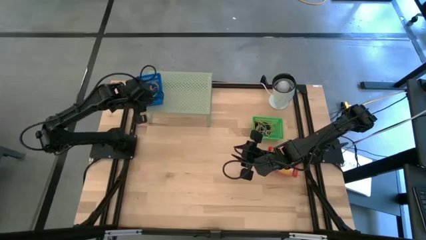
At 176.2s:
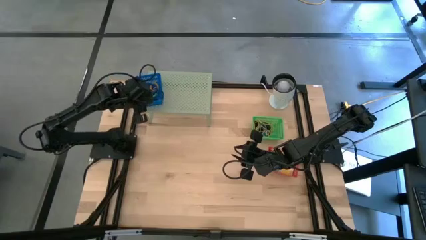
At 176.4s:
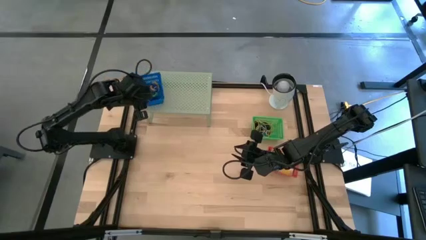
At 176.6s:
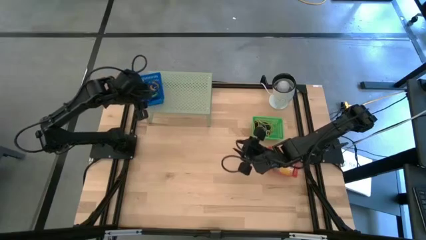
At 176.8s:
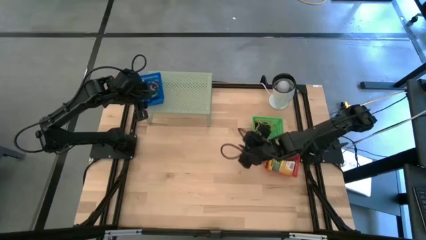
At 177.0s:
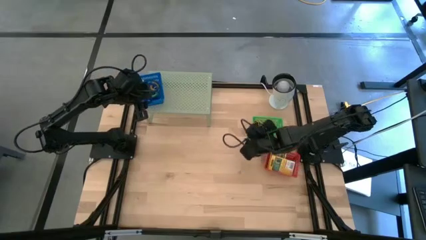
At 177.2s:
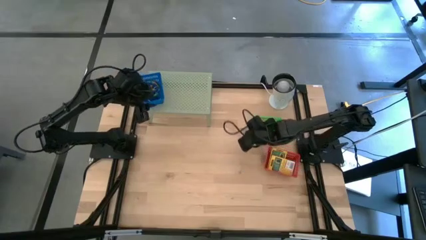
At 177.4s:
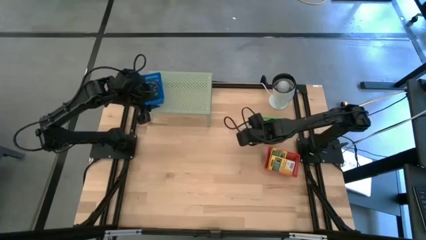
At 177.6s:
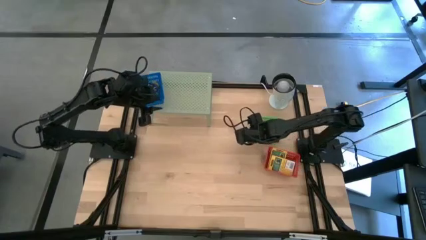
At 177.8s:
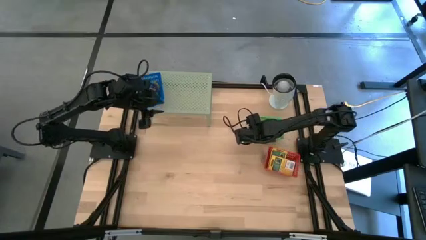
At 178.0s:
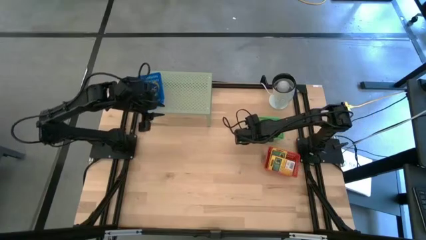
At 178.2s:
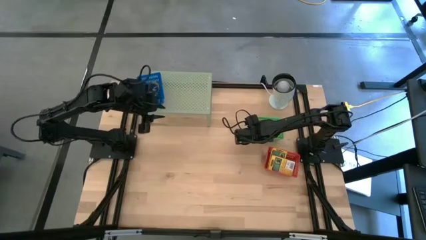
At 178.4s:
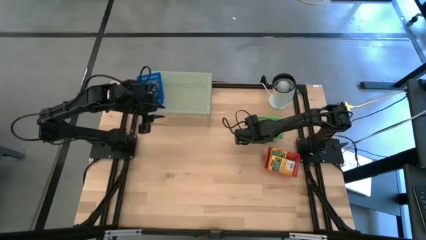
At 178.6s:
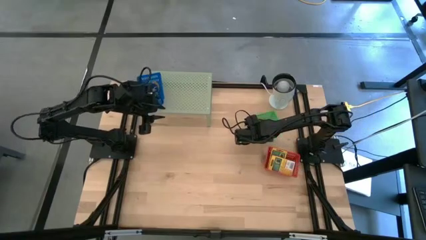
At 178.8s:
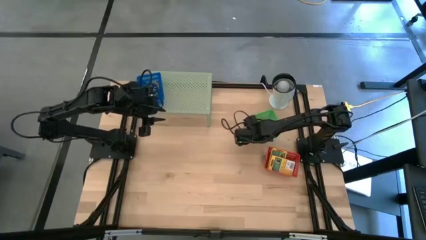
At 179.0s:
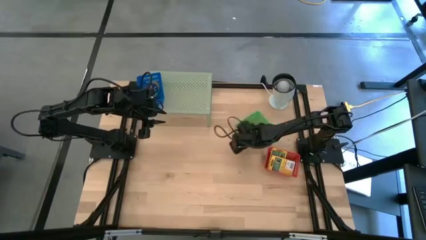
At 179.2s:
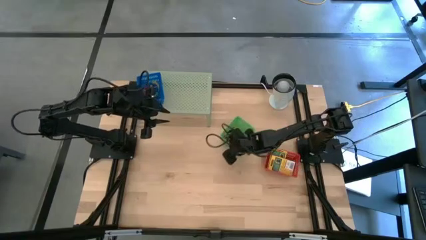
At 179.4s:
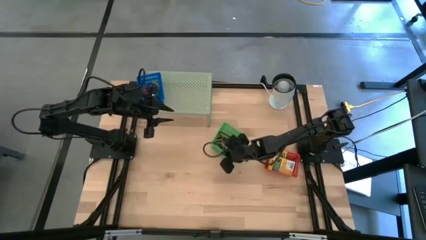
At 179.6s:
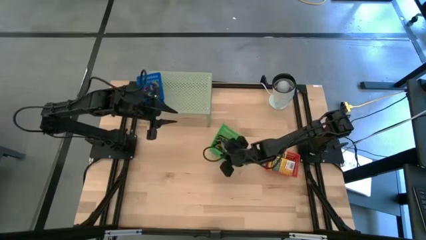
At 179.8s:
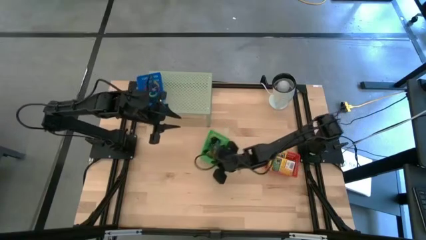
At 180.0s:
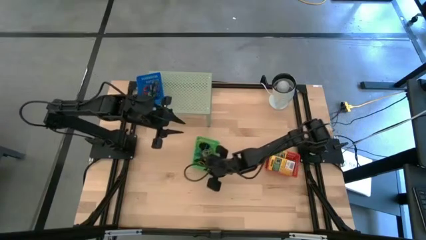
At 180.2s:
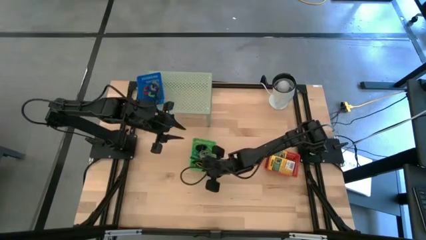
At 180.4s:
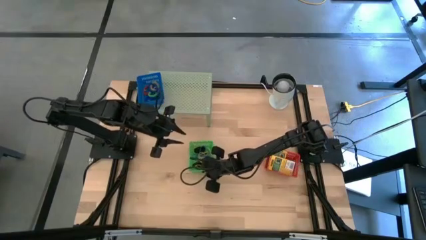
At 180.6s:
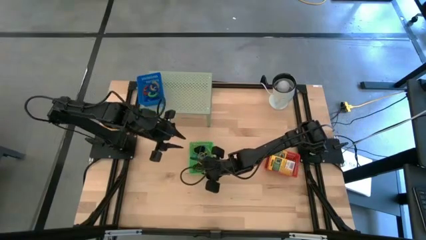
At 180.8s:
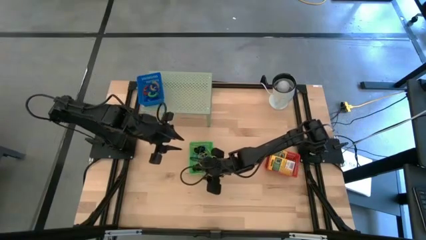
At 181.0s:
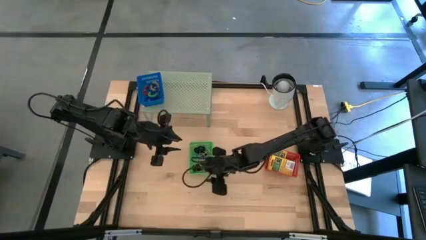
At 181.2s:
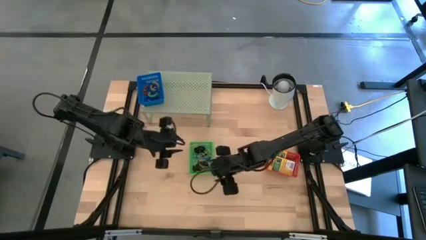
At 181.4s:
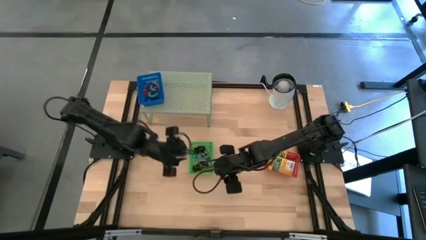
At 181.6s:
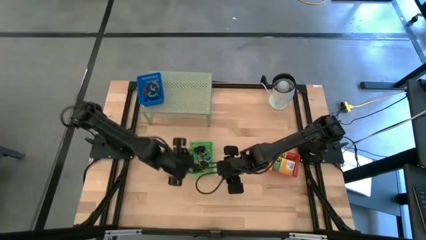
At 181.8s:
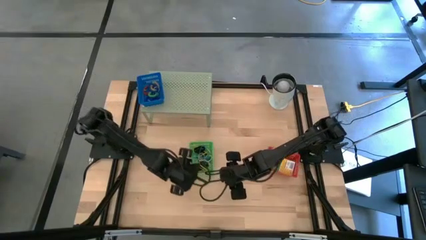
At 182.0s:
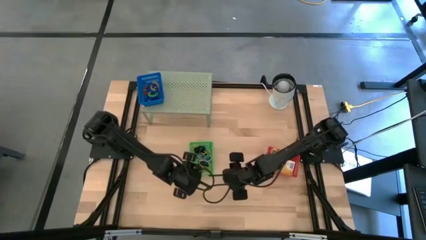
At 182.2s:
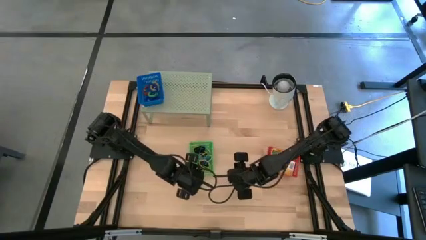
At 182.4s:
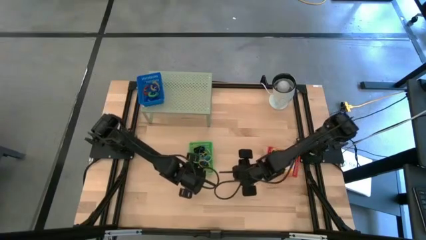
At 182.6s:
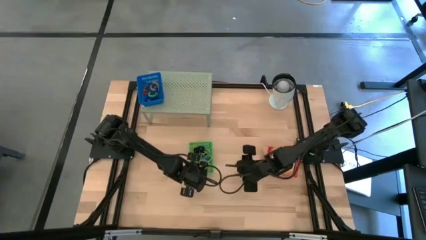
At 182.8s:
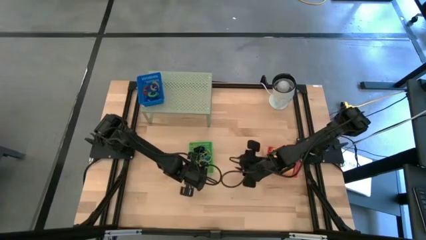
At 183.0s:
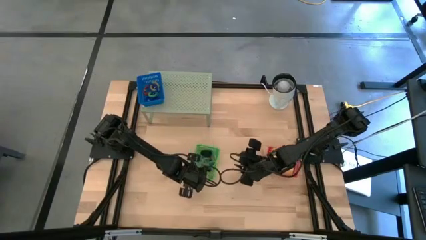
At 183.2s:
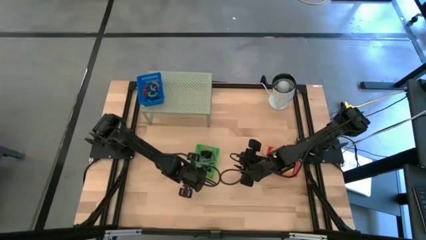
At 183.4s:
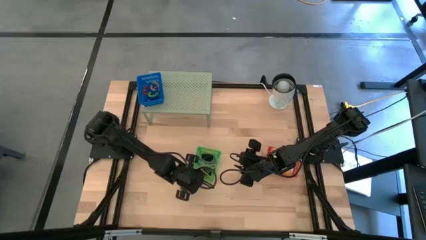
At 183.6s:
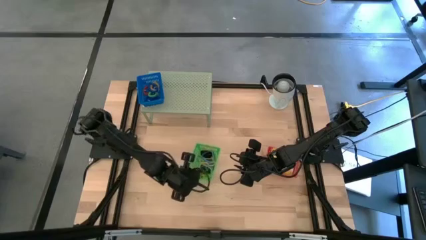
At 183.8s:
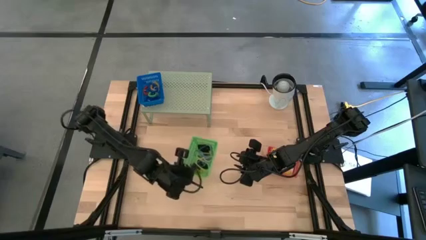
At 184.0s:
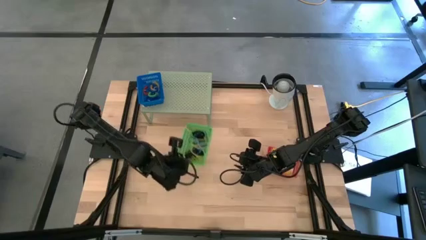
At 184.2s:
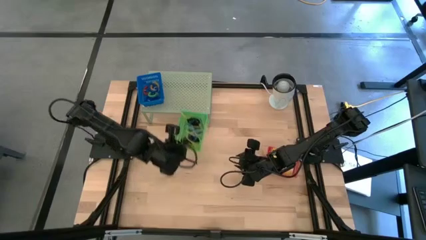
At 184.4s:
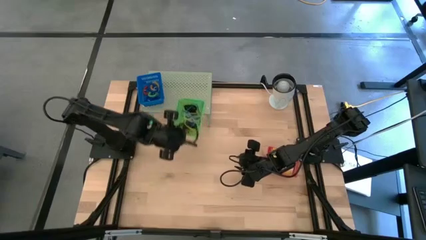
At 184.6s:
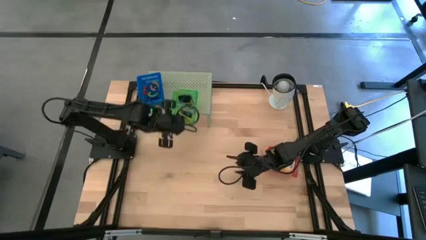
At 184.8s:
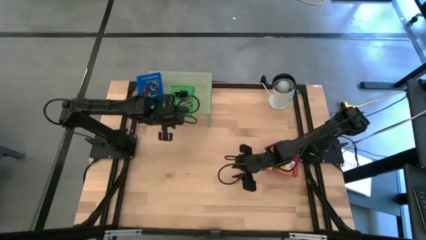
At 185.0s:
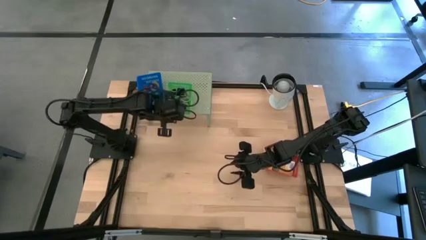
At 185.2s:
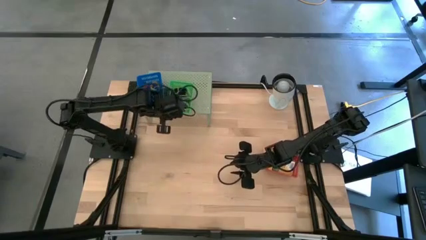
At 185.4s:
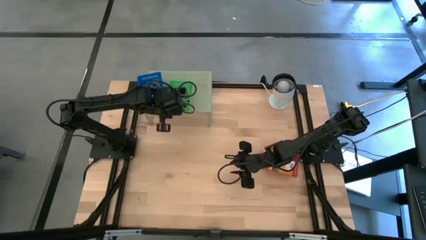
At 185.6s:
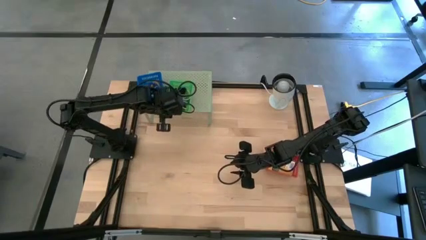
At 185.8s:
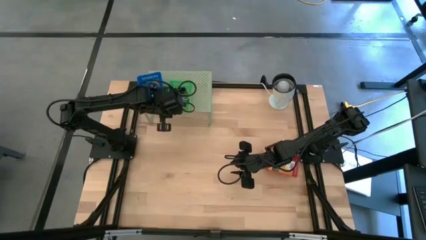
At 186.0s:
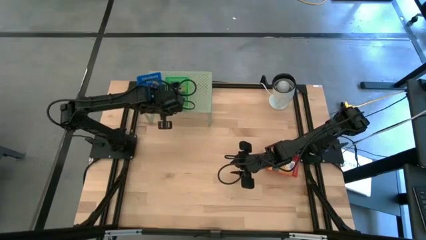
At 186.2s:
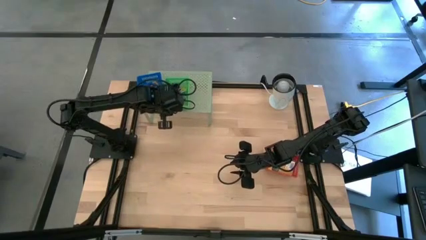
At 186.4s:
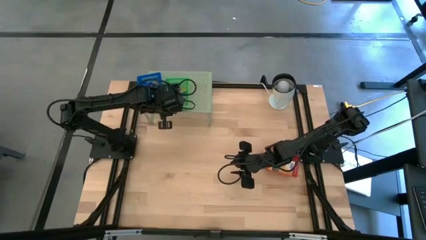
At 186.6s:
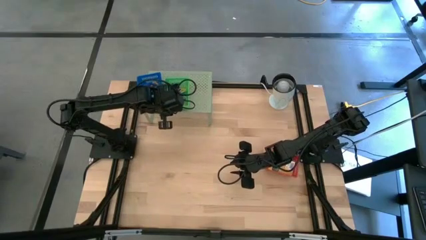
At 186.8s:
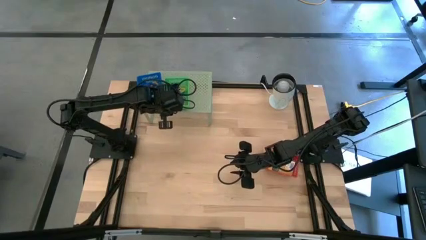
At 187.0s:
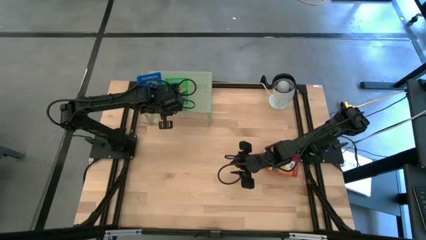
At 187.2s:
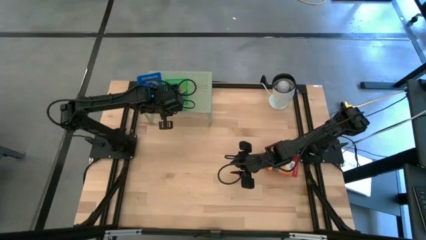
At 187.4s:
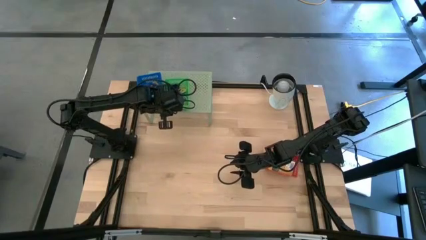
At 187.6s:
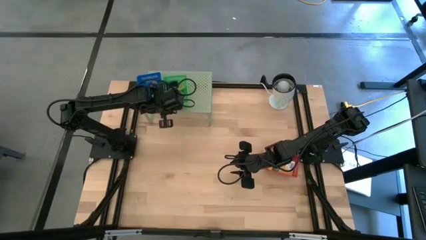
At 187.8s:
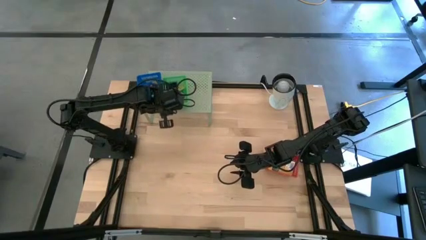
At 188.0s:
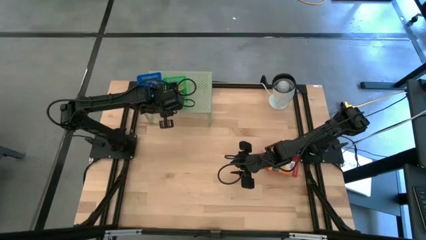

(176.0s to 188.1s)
Task: Pick & Place Office Desk Supplies
Put the green bin on the shelf

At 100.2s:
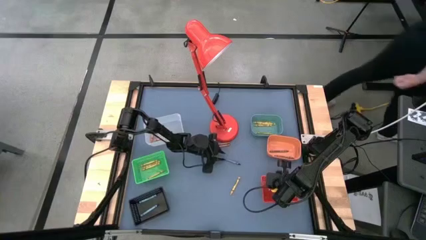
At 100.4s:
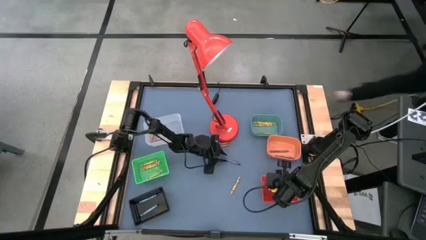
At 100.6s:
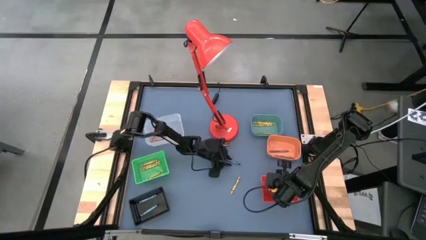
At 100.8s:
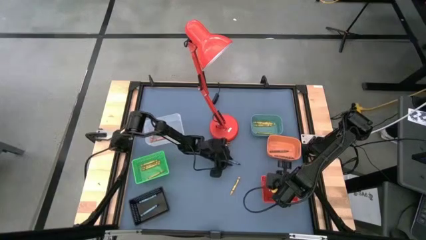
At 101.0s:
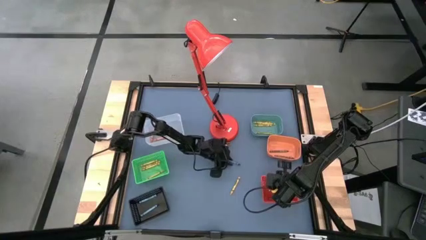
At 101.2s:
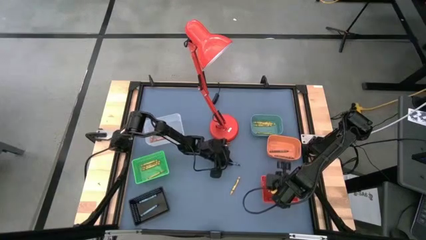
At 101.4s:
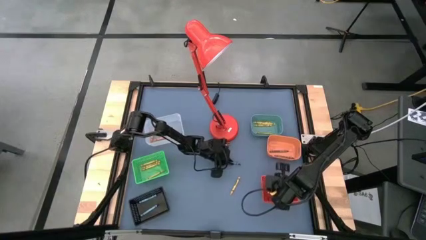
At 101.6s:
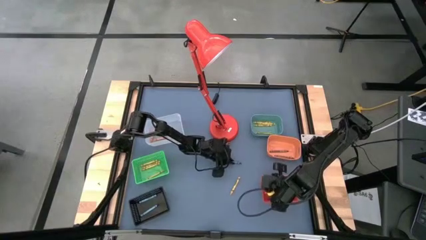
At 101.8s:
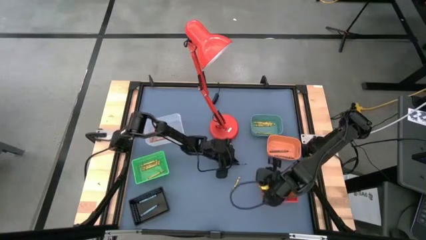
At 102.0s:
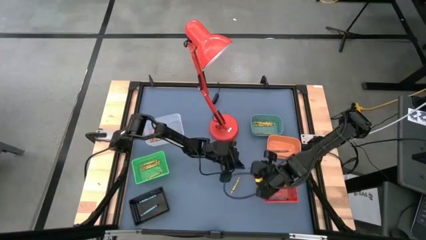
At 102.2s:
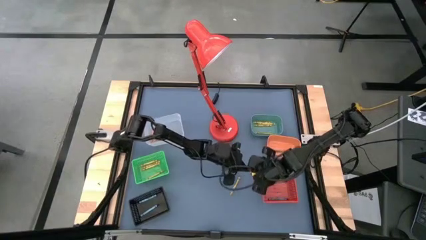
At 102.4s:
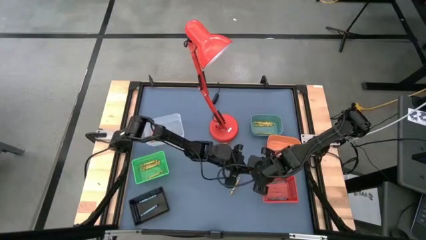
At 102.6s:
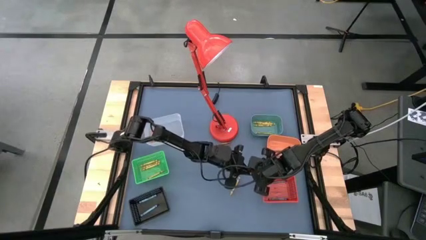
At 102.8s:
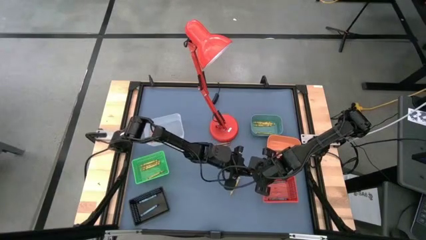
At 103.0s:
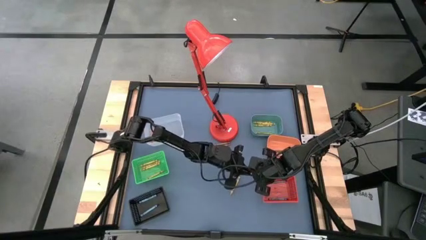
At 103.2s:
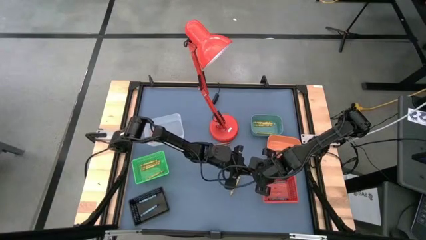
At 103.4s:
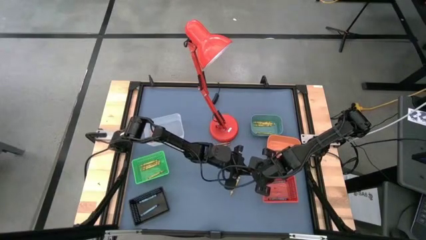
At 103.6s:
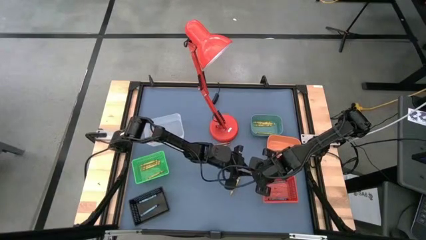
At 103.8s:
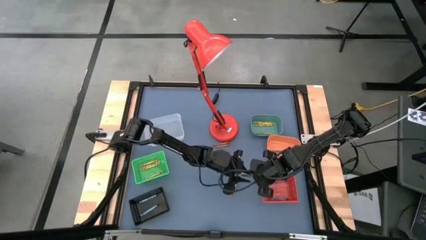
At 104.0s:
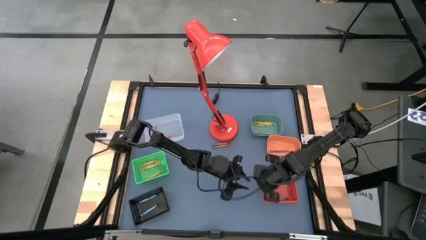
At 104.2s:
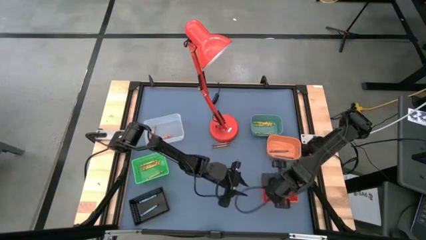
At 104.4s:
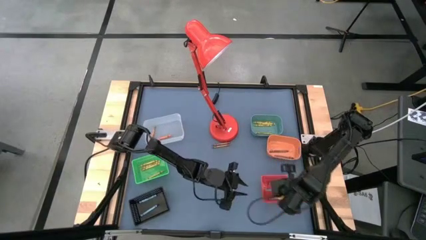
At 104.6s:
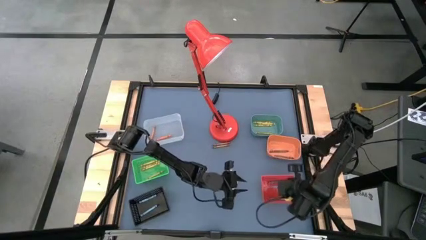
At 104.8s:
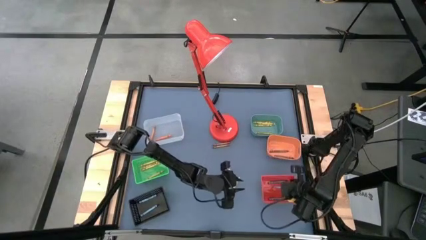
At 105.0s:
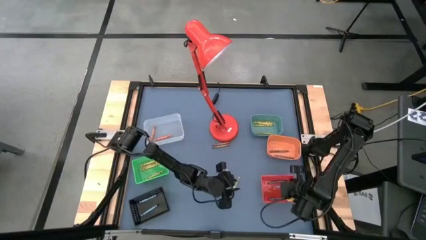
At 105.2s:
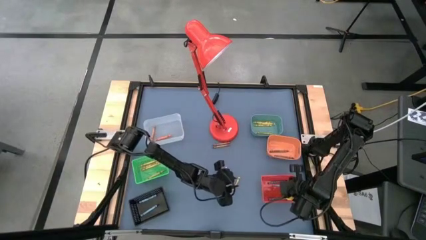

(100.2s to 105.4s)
Task: Sort crayons
Put the dark blue crayon into the red bin
